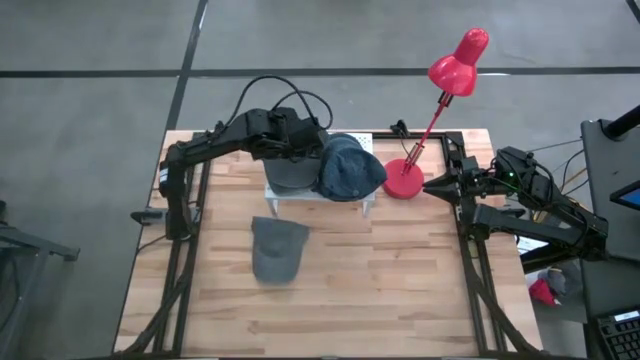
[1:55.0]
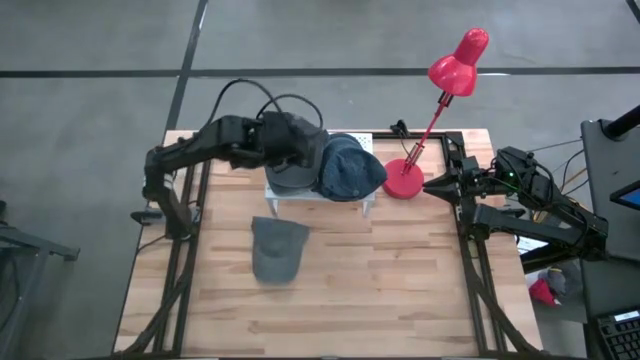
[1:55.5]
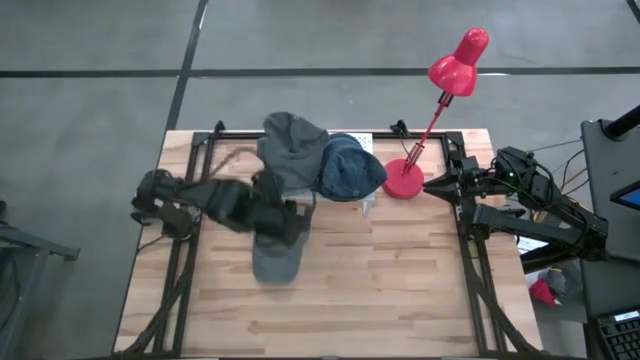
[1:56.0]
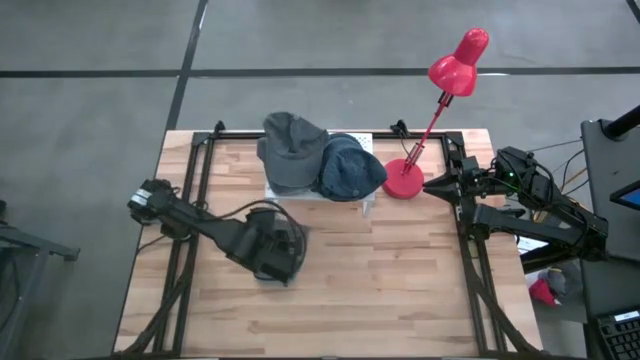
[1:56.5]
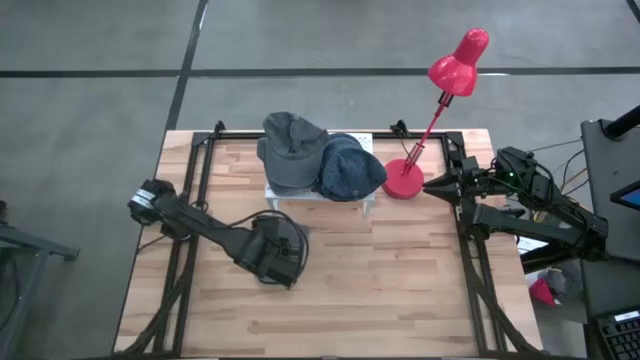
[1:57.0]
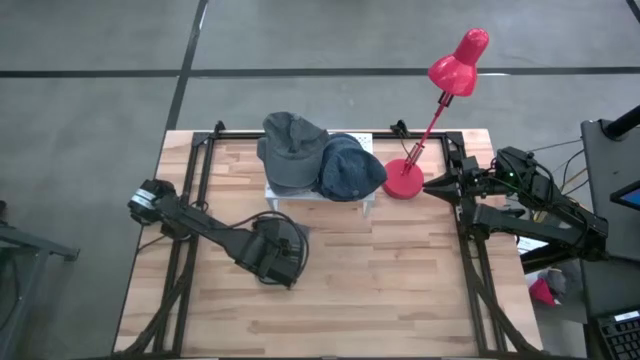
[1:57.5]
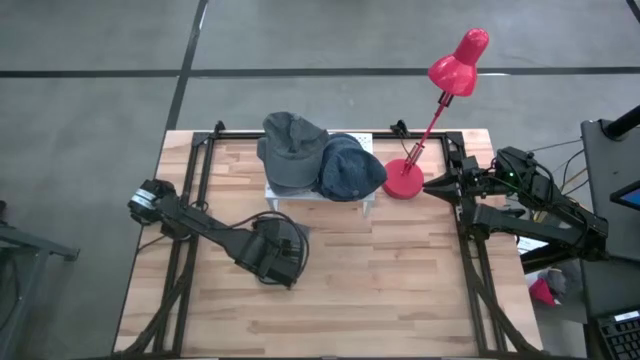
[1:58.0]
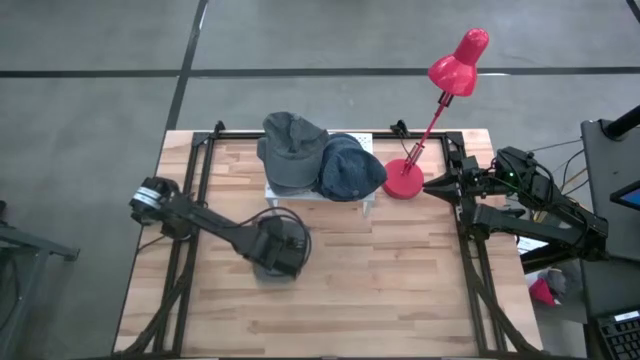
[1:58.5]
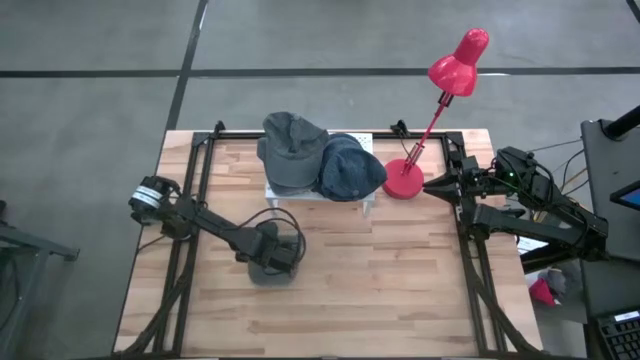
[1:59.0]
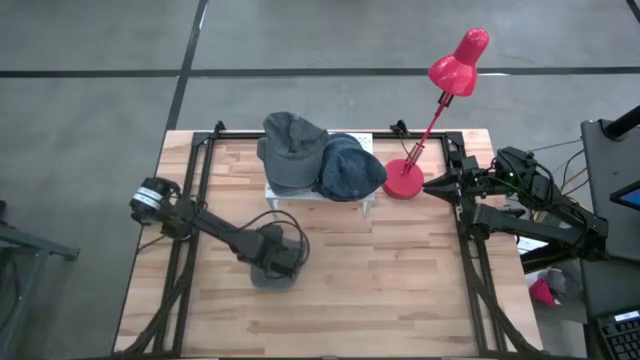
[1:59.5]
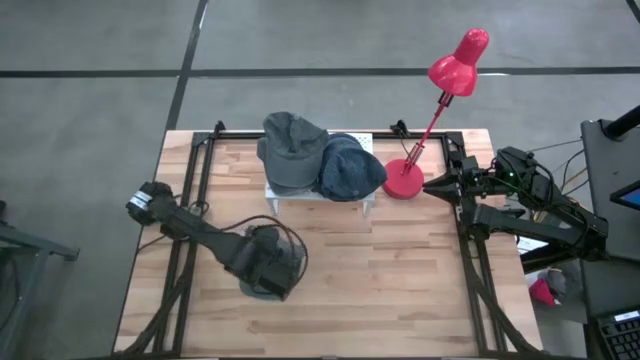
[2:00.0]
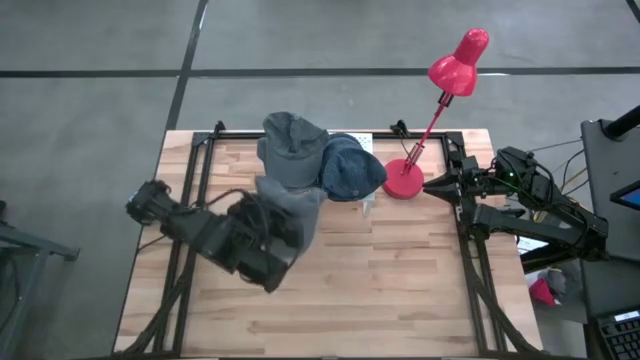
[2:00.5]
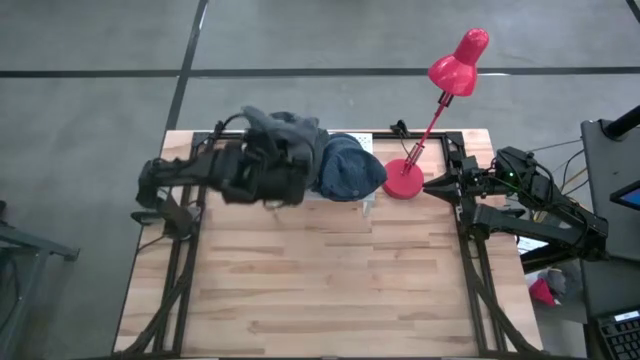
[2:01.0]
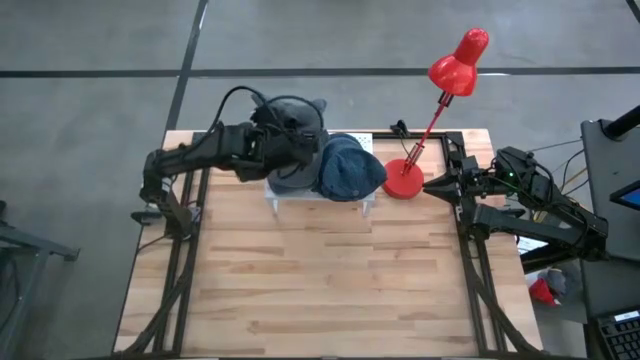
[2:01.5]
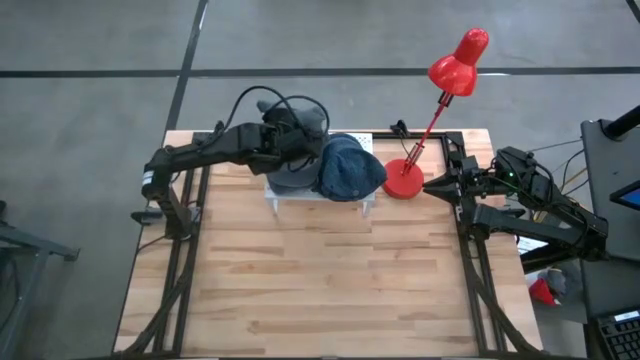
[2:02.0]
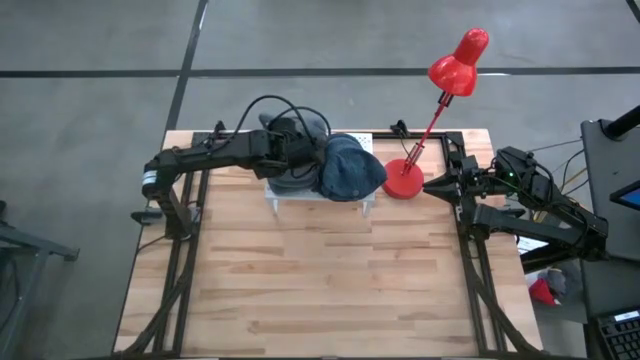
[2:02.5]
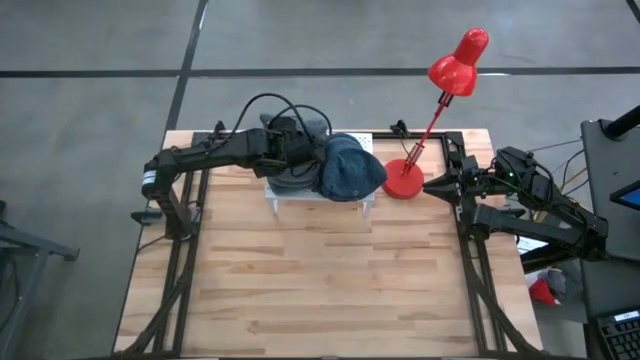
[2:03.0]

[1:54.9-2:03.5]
Task: Pick & Place hat
Stack the gray cap on the gray cap on the shelf

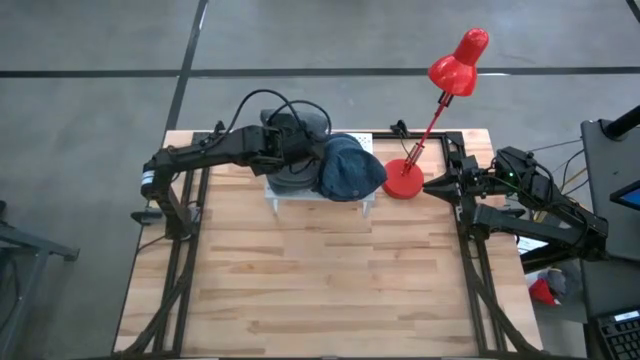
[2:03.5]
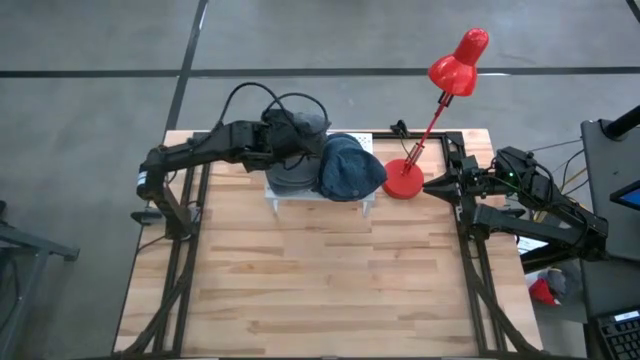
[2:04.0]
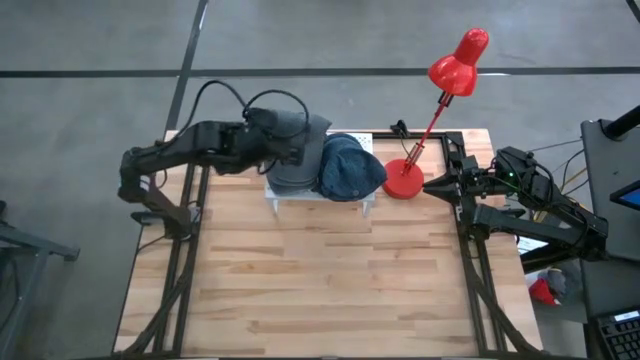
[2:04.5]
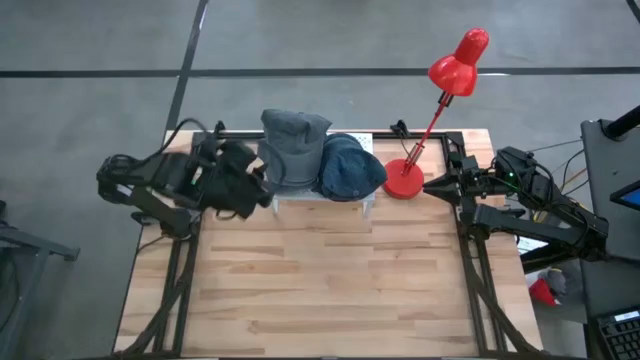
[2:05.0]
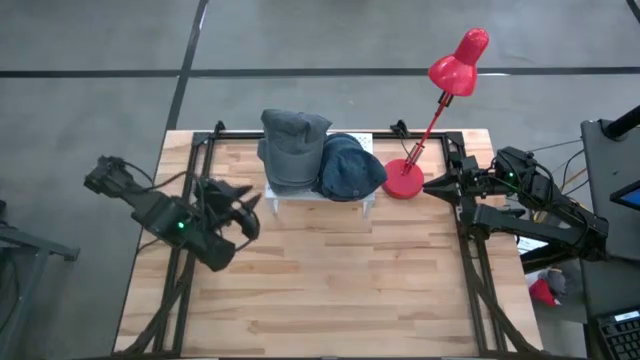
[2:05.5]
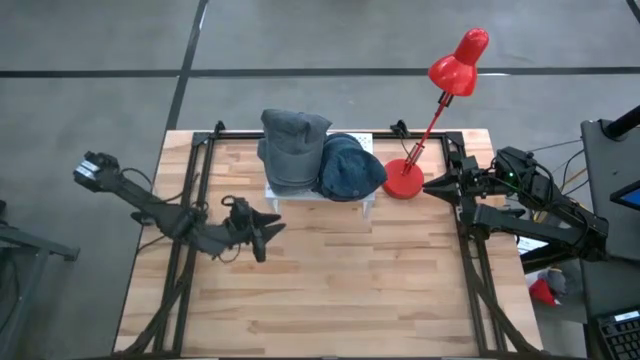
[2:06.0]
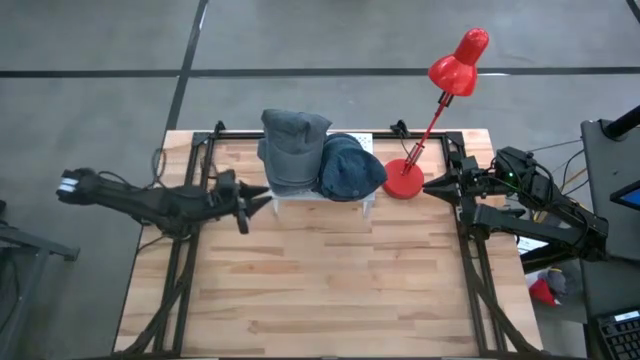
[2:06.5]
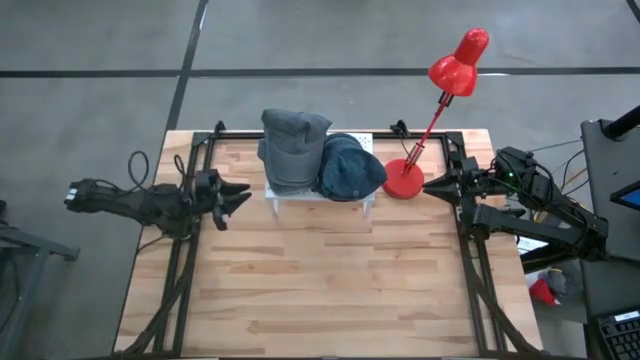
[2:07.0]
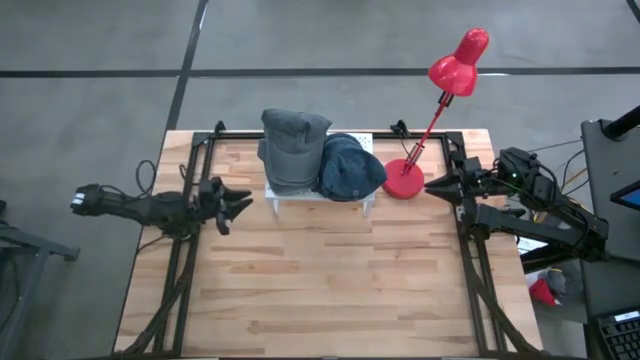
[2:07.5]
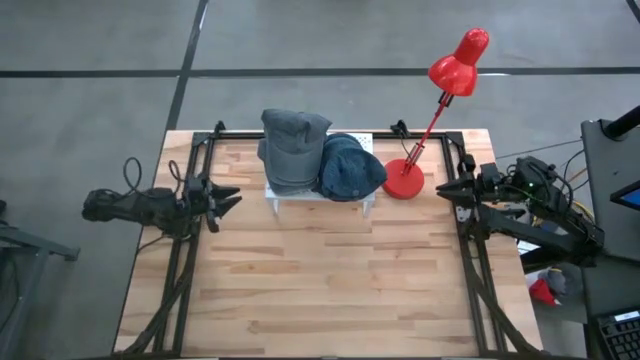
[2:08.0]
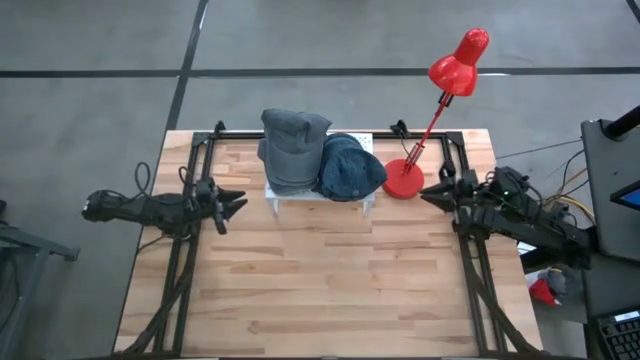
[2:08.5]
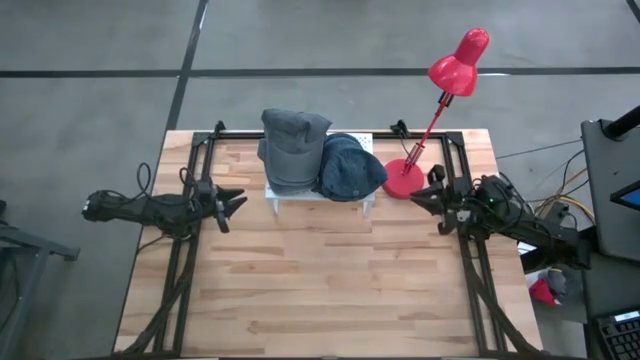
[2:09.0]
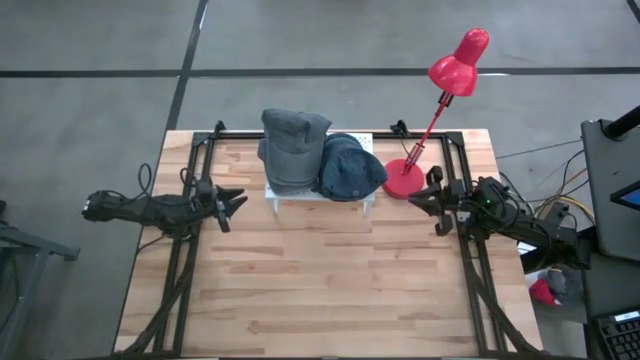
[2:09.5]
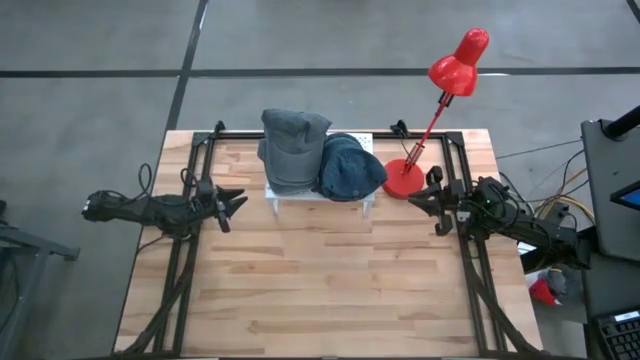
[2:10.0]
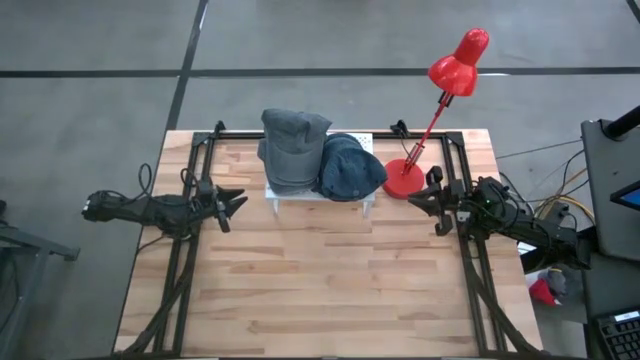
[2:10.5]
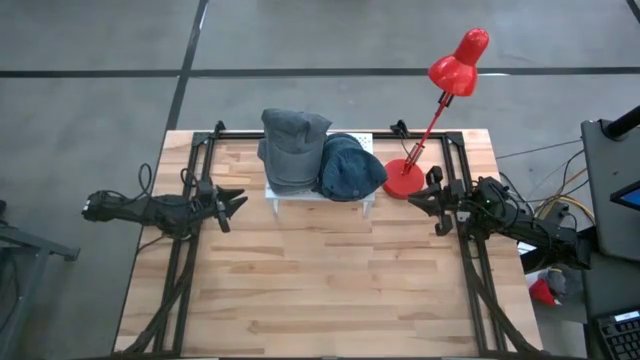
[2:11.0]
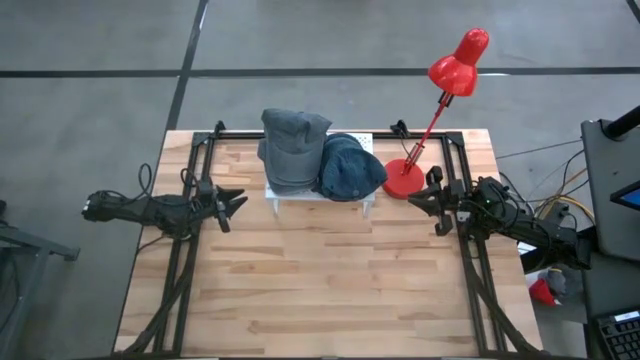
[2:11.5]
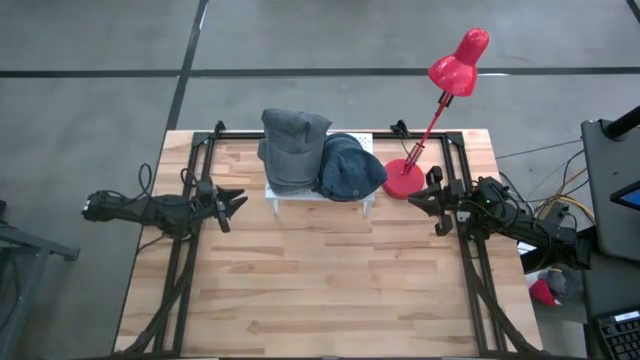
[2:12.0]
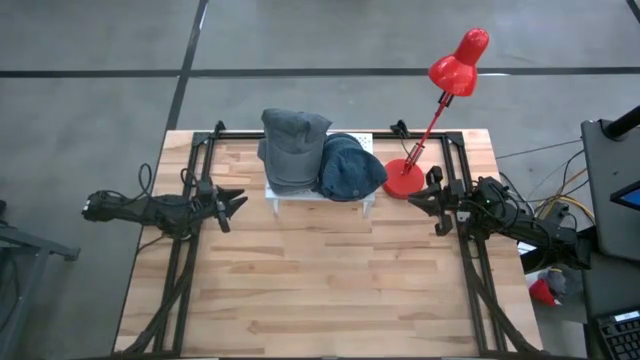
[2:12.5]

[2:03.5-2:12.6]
Return to Home Position

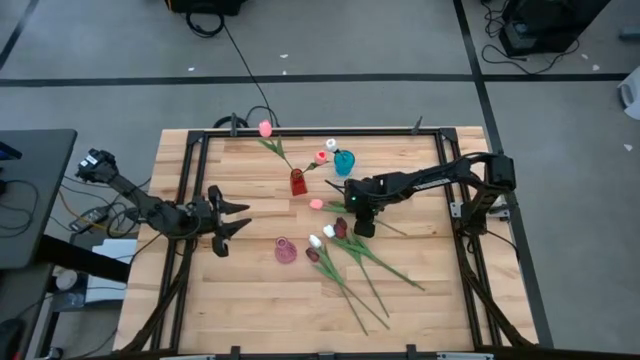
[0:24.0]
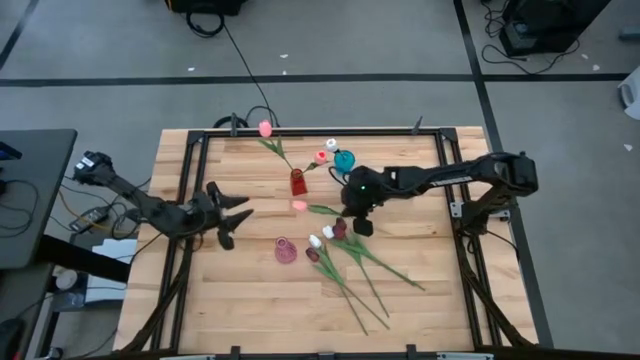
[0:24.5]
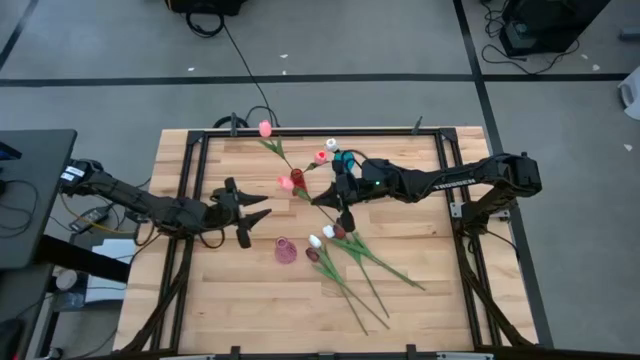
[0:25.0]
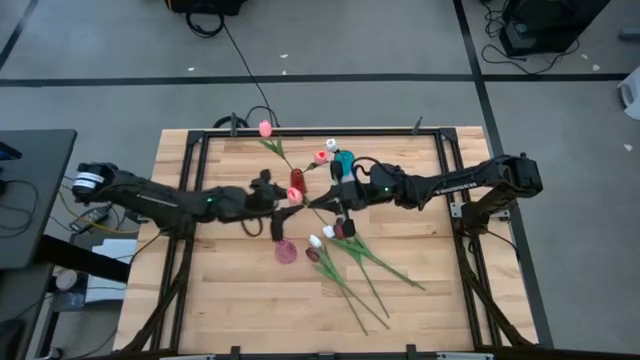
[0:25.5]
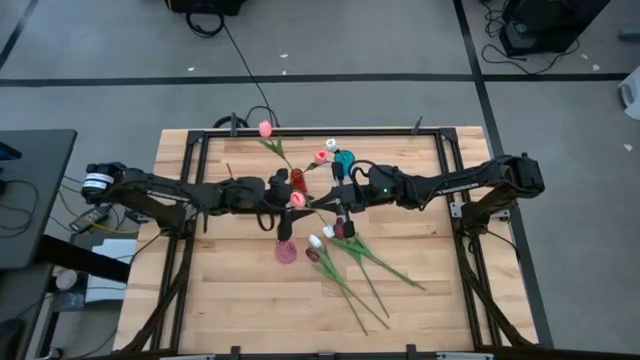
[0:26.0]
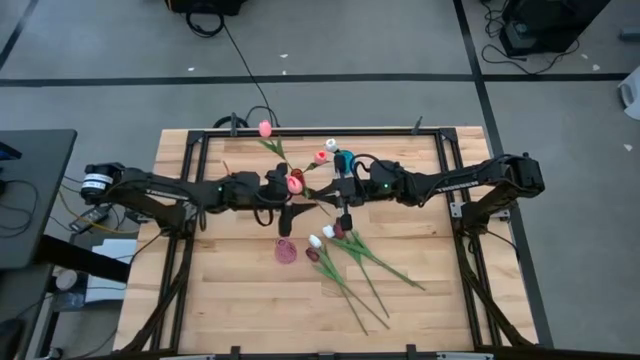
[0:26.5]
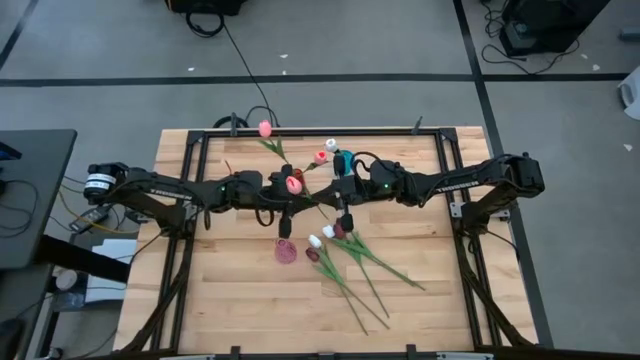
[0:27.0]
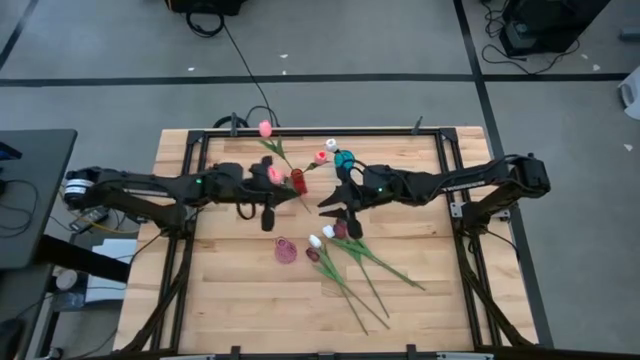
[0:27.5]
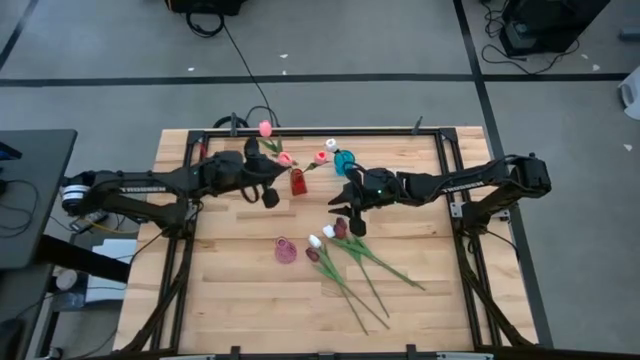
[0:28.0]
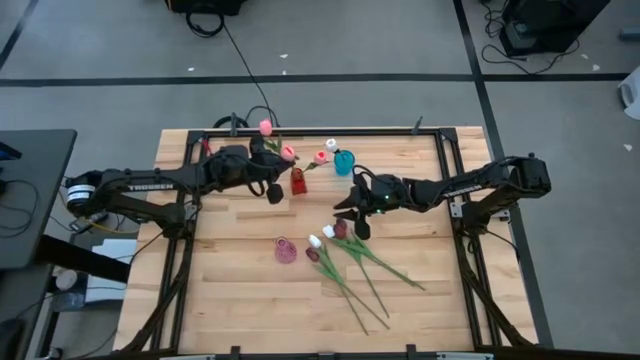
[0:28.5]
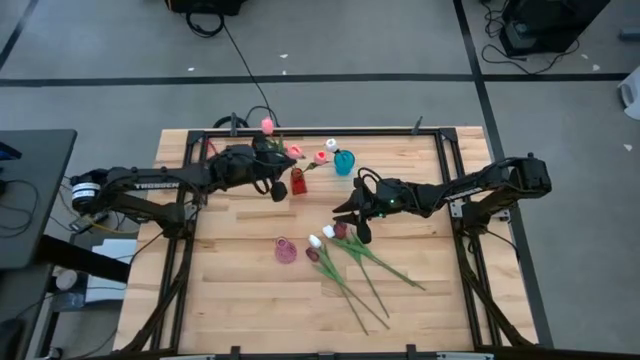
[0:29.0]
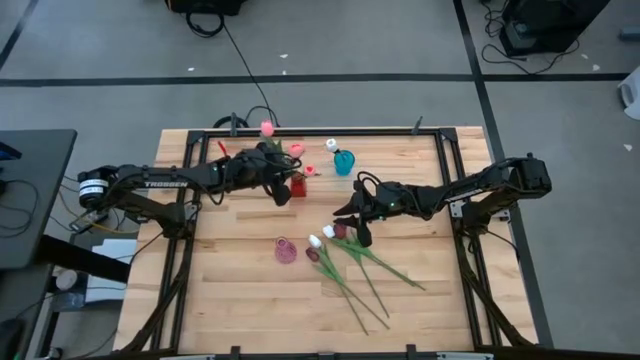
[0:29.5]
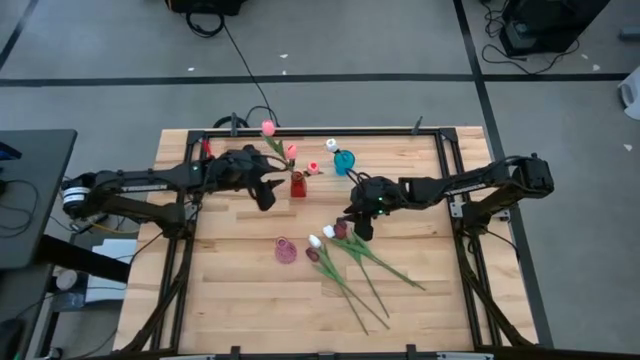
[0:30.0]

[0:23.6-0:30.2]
Task: Sort flowers into vase by color
Put the pink flower into the red vase
